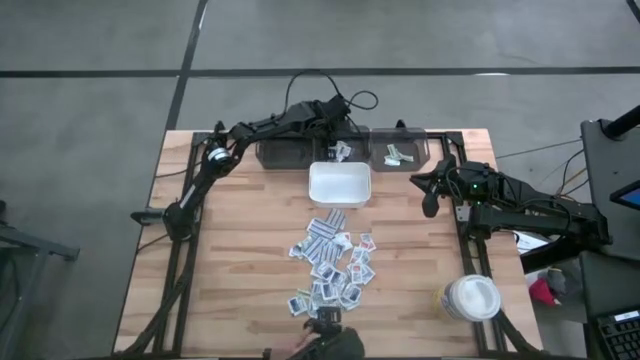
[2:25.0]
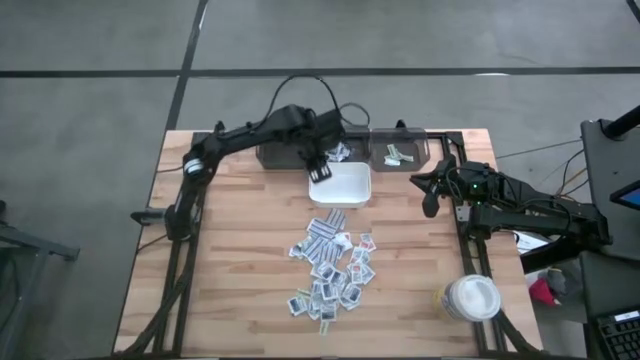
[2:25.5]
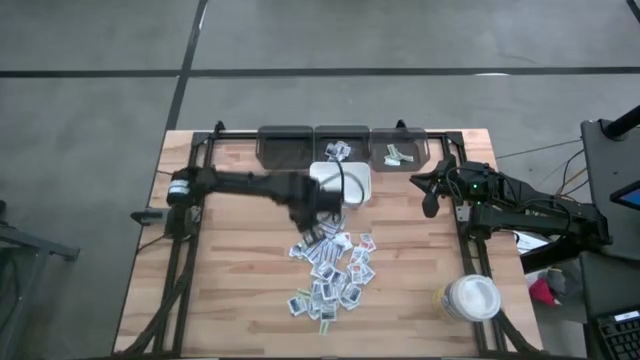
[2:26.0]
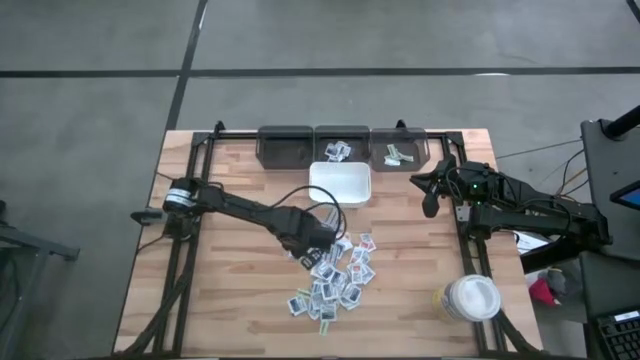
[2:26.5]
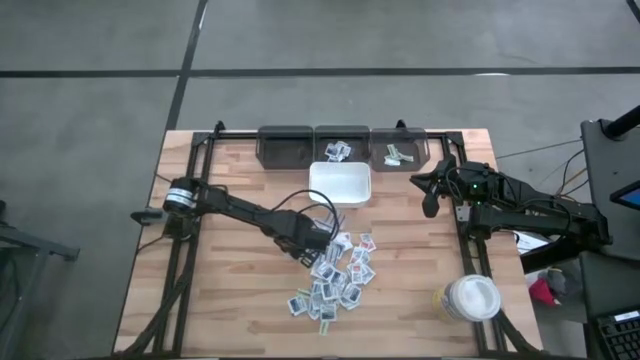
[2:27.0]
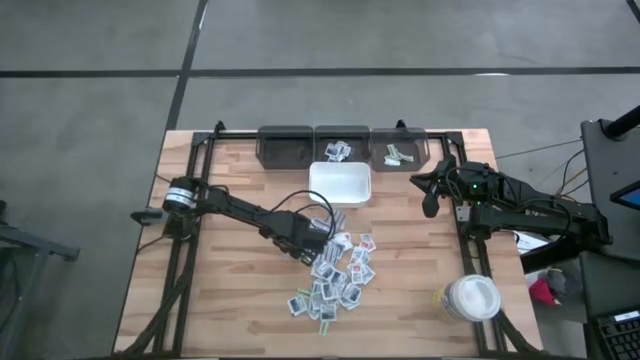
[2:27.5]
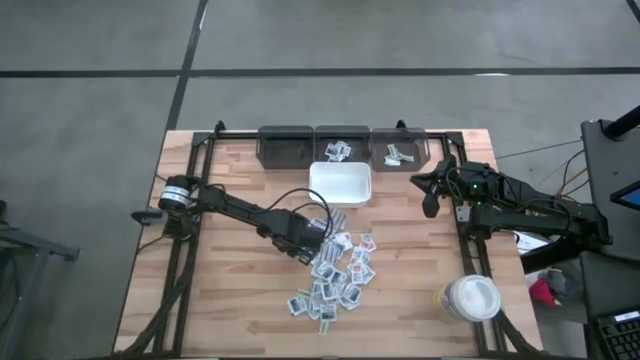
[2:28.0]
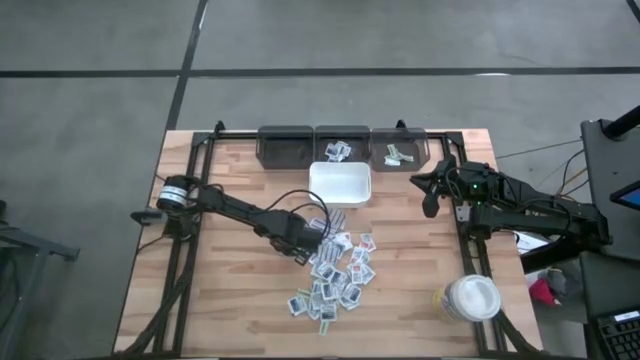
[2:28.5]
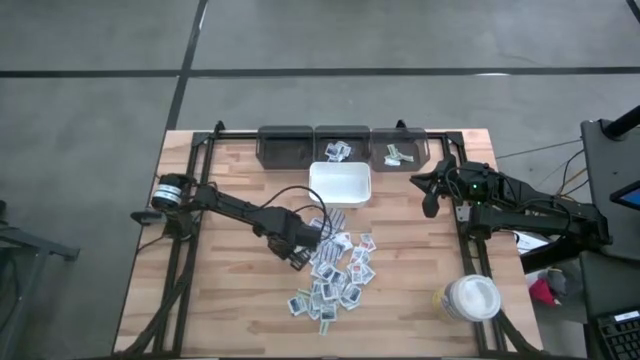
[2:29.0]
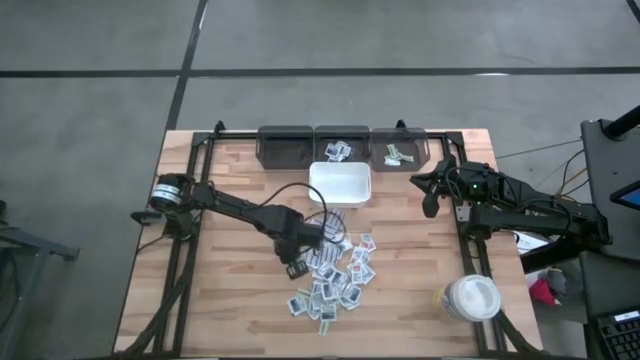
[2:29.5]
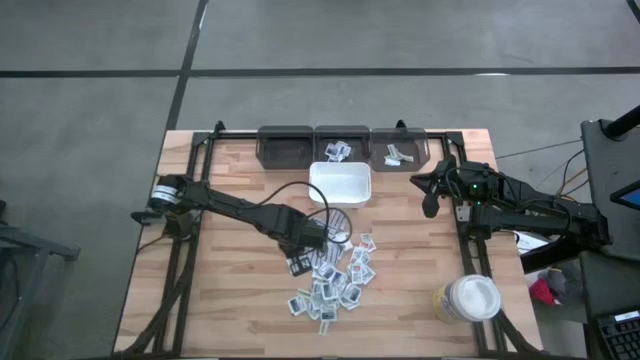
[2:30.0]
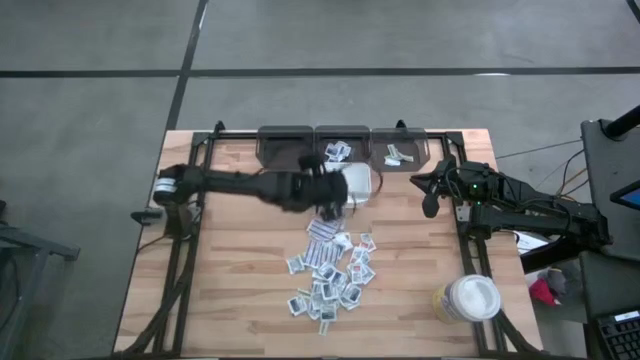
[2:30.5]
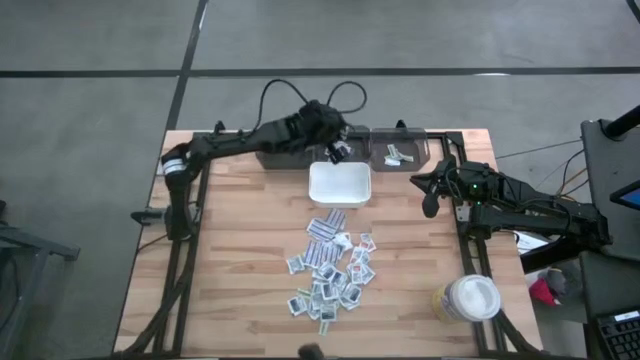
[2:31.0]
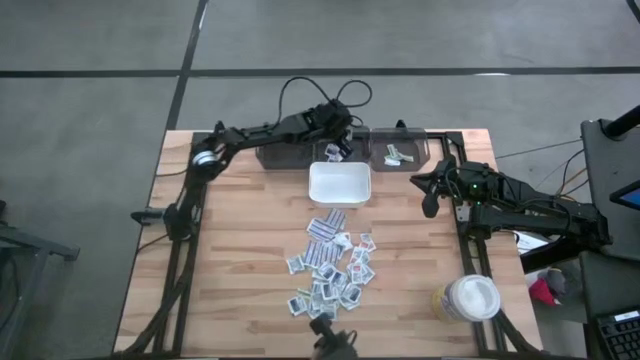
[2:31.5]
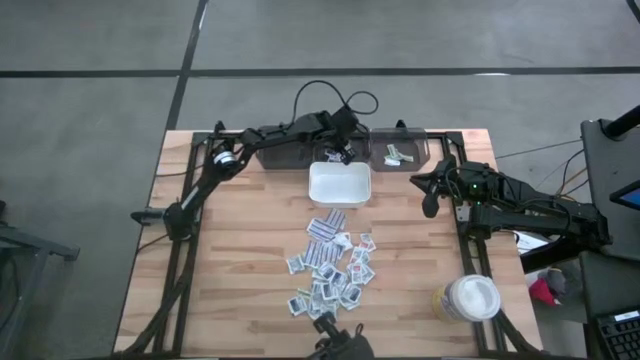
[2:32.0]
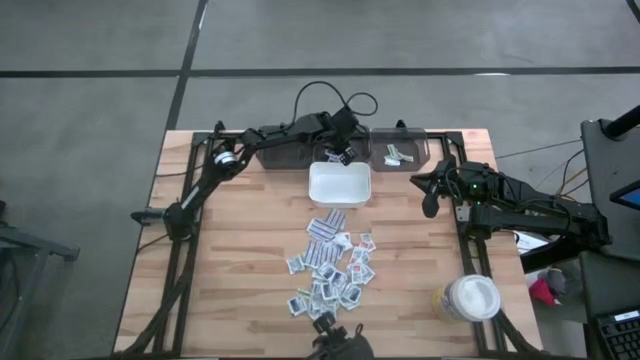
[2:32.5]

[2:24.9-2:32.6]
Task: Pick & Place First Aid Supplies
Put the blue alcohol pad into the middle gray bin

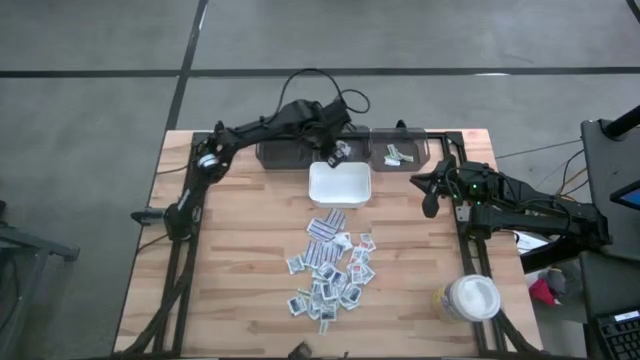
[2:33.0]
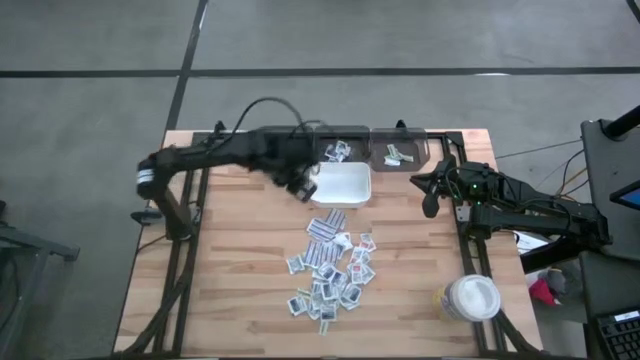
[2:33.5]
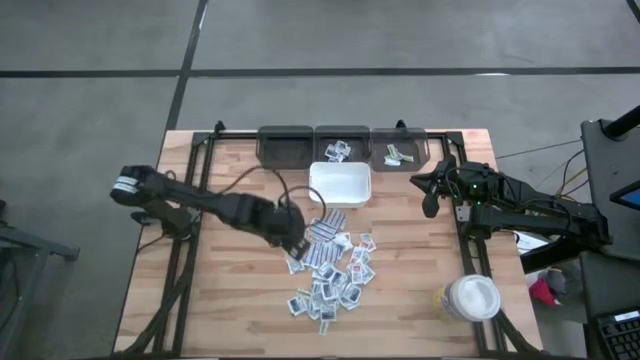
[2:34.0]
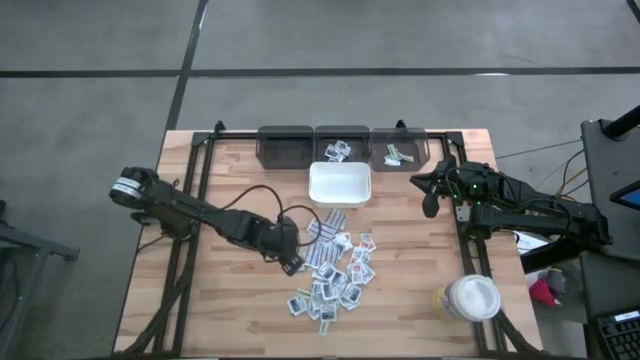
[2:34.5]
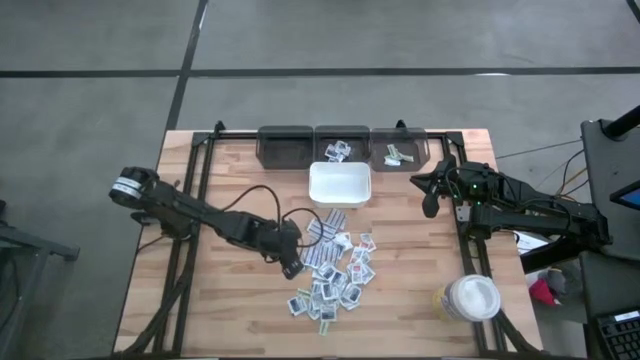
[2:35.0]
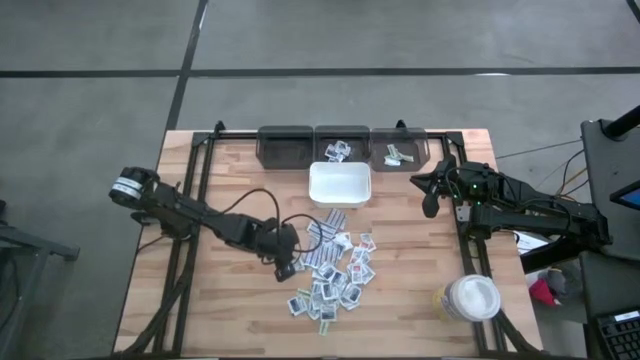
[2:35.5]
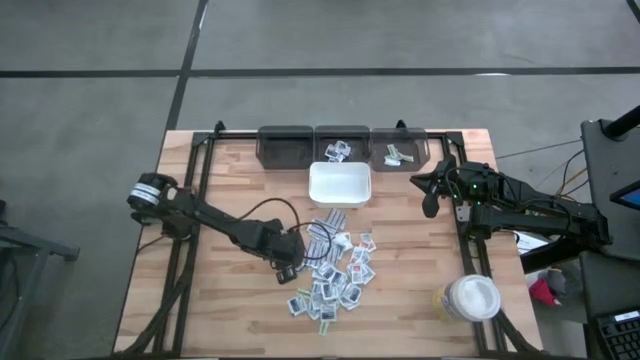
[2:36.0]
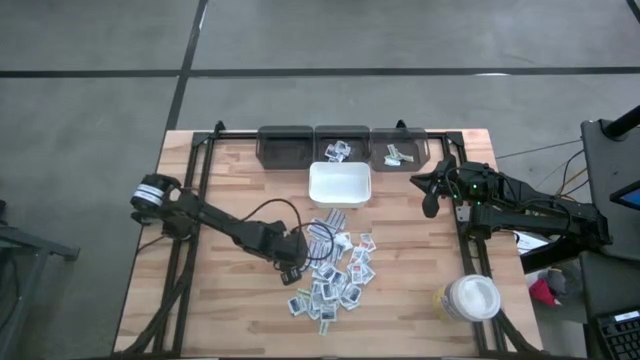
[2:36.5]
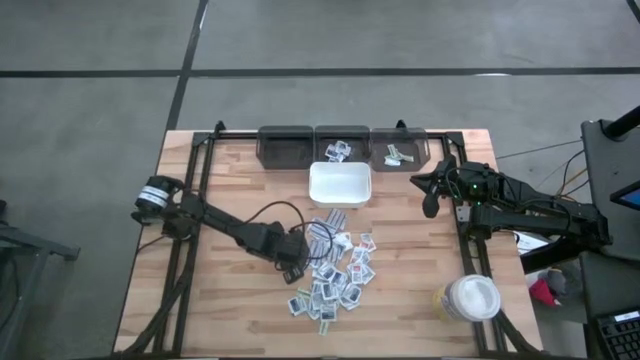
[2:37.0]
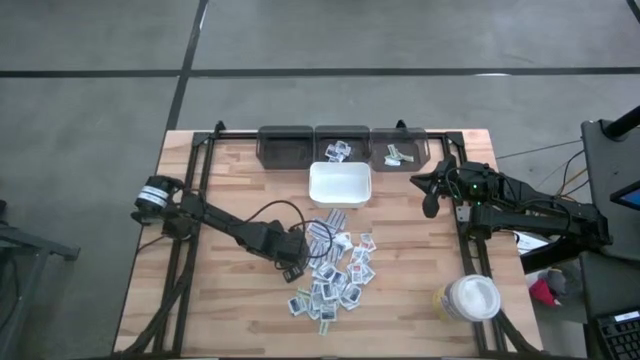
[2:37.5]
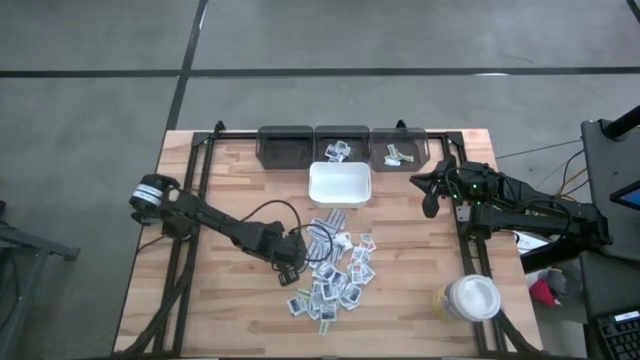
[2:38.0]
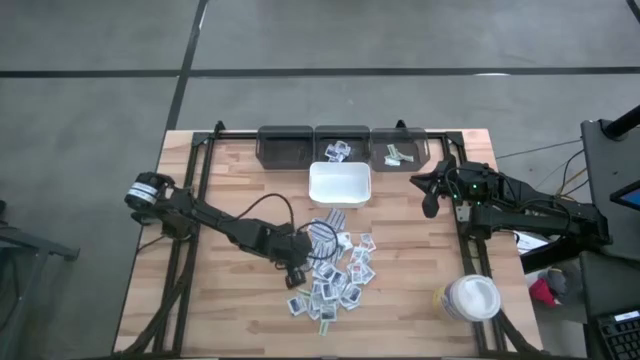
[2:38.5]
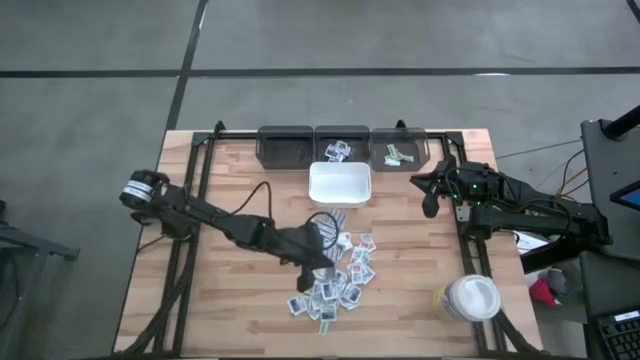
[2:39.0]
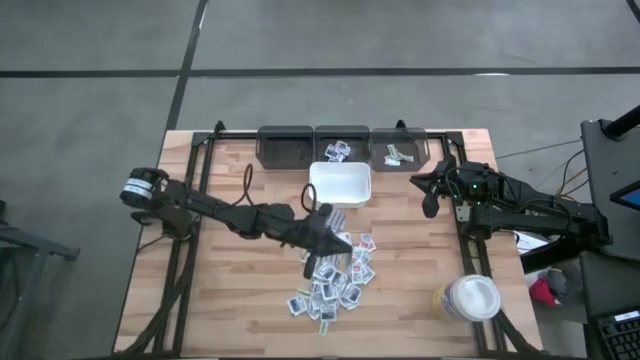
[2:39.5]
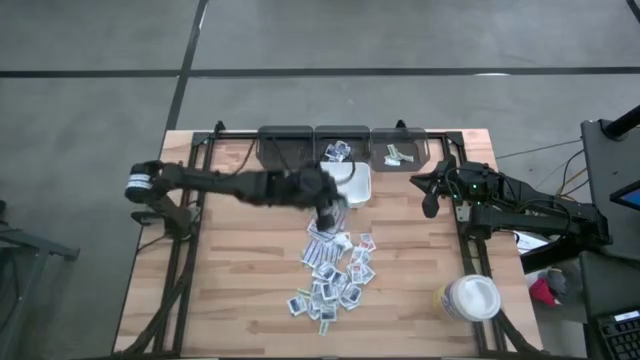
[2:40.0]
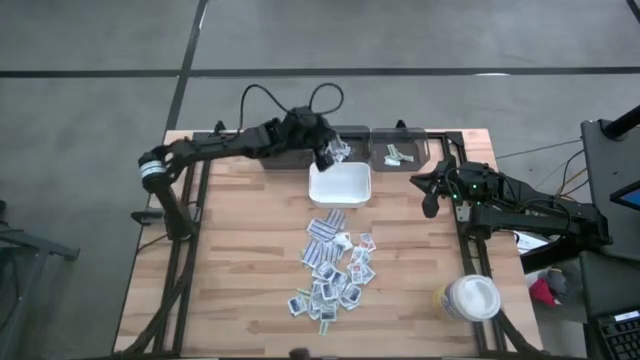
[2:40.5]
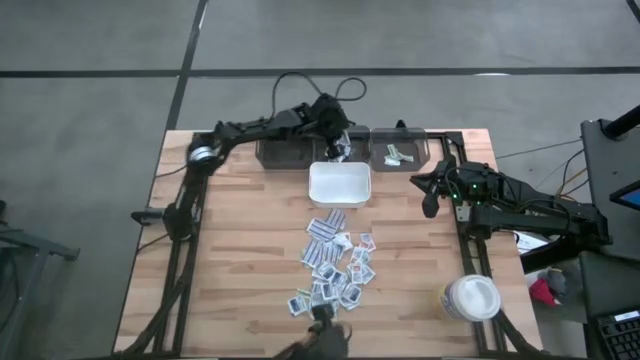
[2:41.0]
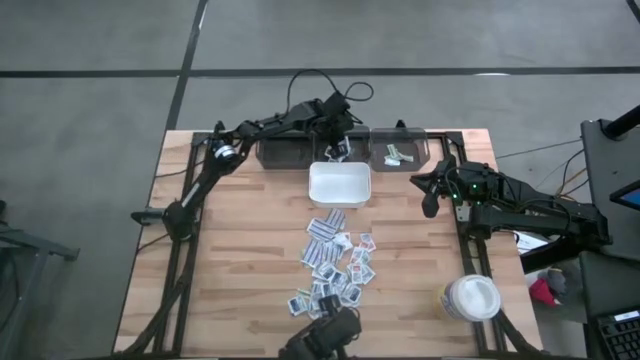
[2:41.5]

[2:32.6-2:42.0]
Put the blue alcohol pad into the middle gray bin

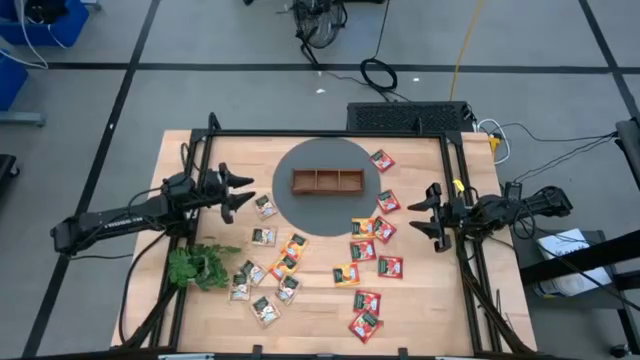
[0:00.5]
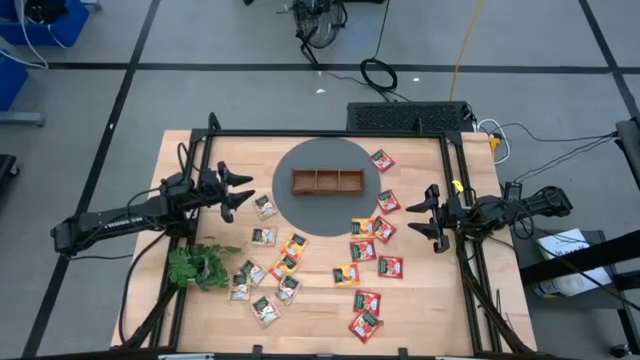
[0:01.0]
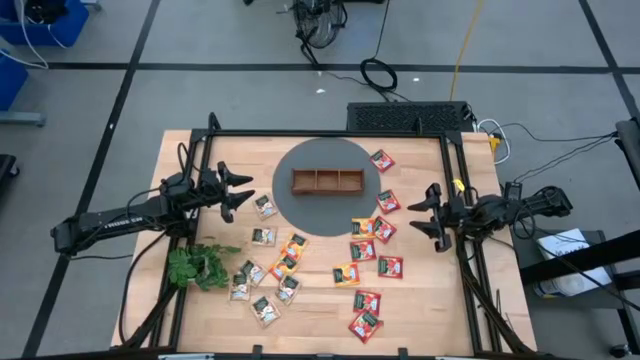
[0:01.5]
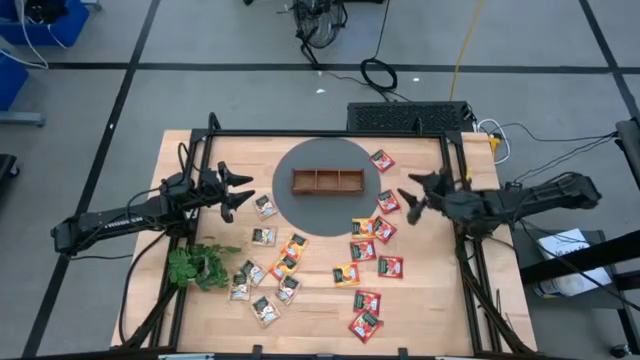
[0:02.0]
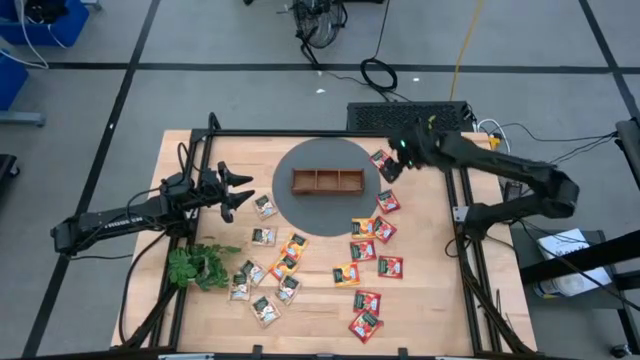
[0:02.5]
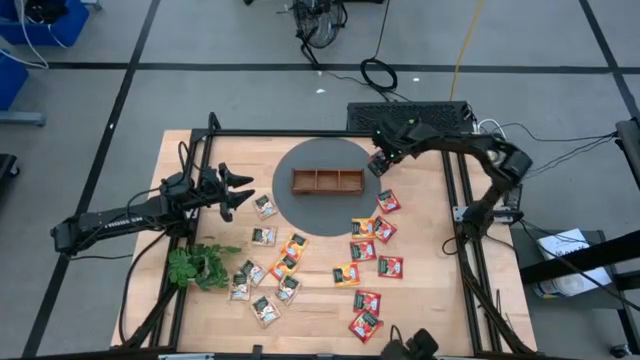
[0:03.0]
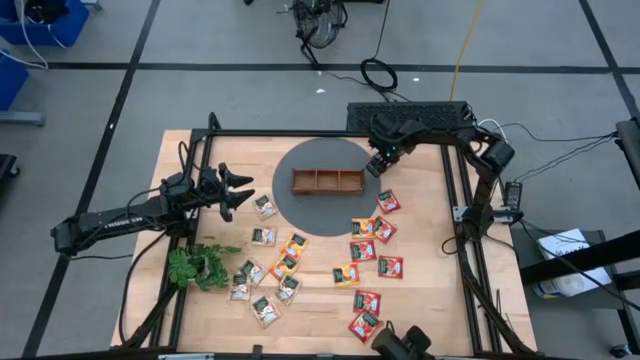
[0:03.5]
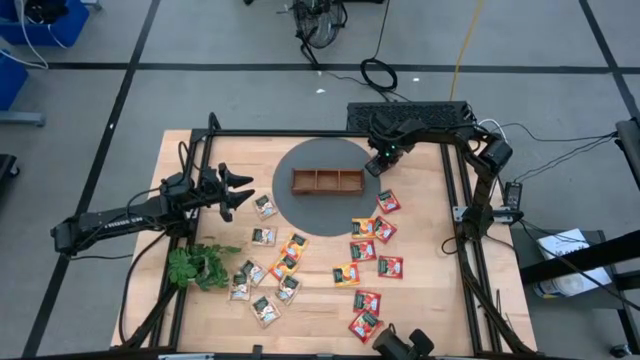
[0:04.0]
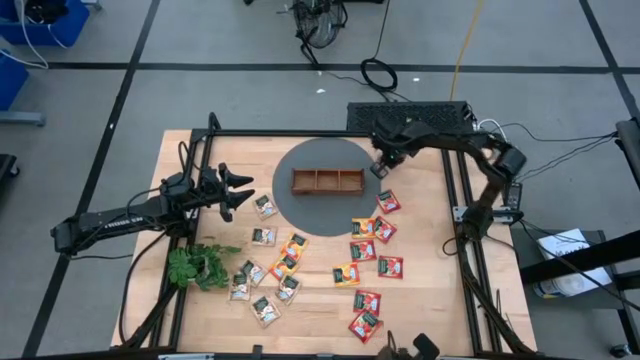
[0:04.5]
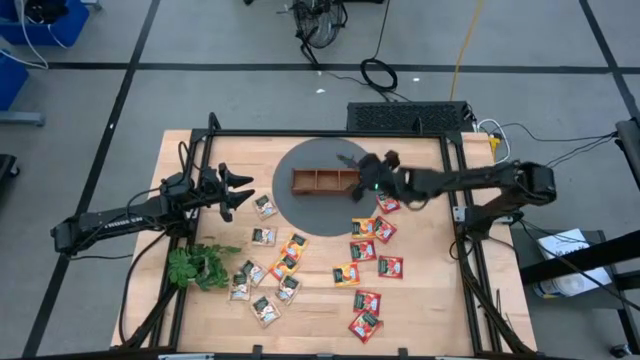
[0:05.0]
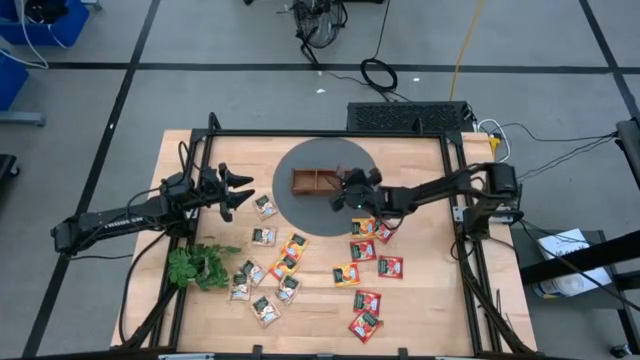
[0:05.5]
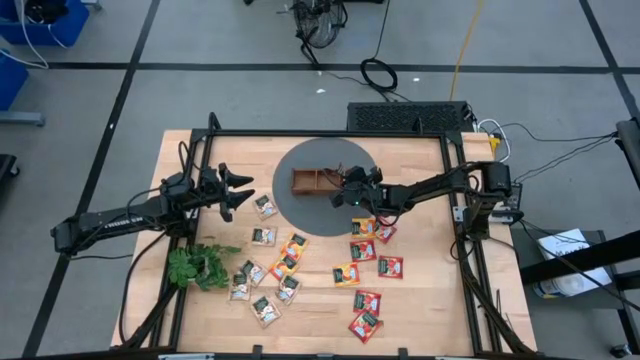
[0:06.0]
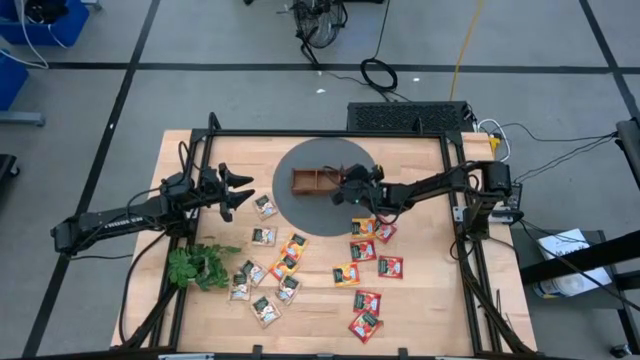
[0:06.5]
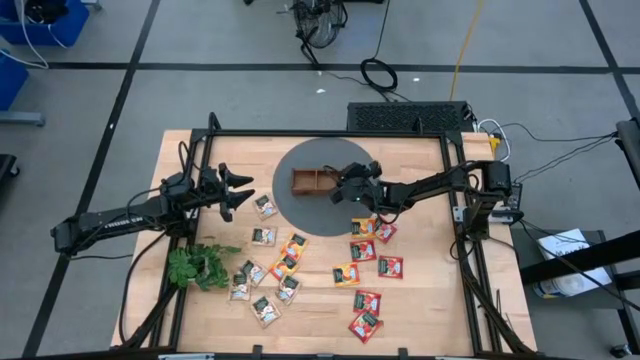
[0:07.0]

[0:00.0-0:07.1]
Task: Pick & Place Tea
Put the red tea bag into the right section of the wooden organizer
